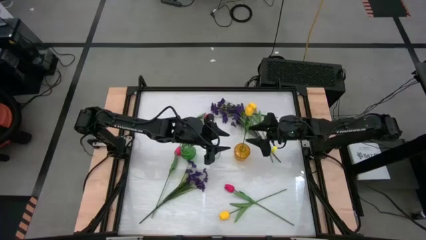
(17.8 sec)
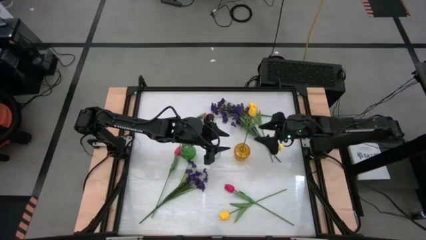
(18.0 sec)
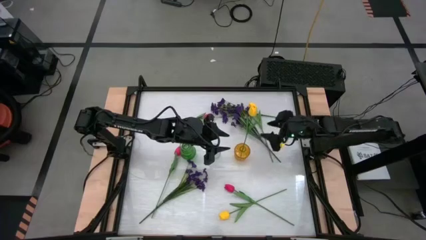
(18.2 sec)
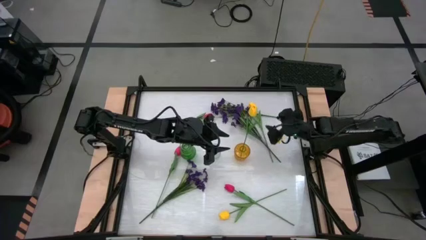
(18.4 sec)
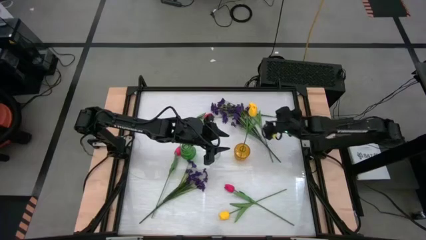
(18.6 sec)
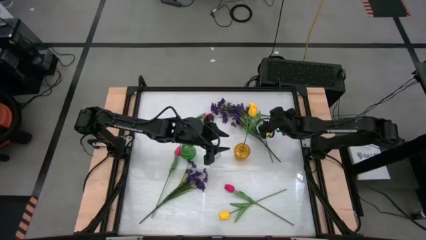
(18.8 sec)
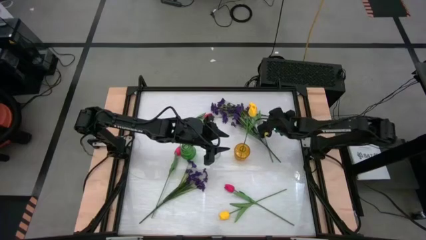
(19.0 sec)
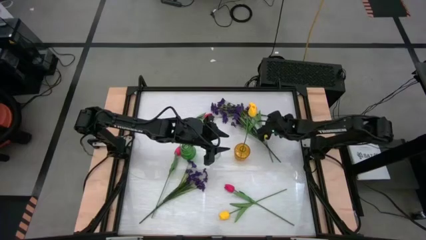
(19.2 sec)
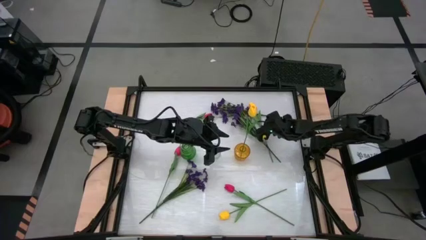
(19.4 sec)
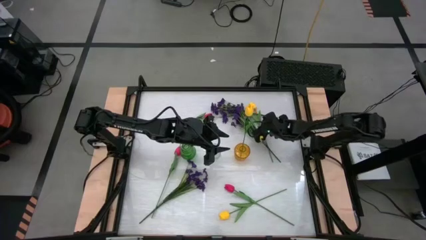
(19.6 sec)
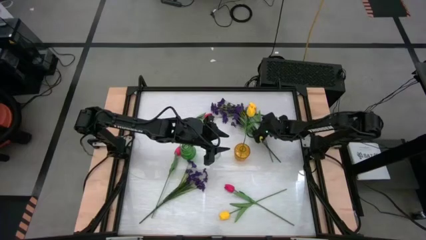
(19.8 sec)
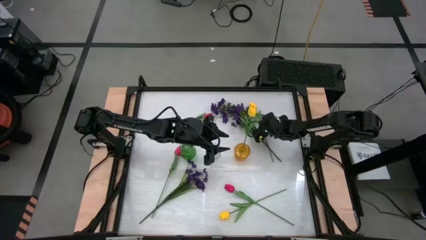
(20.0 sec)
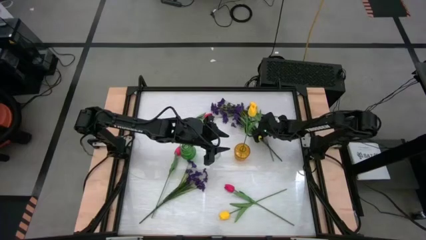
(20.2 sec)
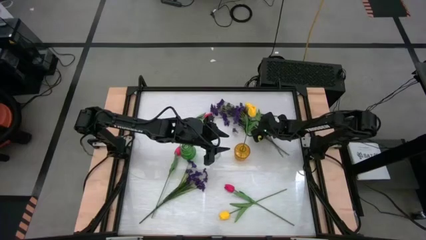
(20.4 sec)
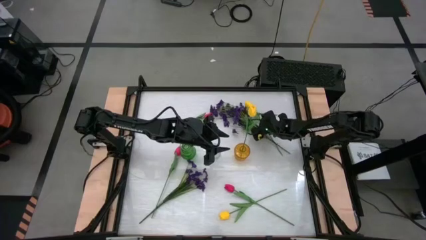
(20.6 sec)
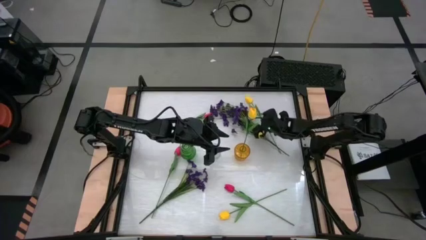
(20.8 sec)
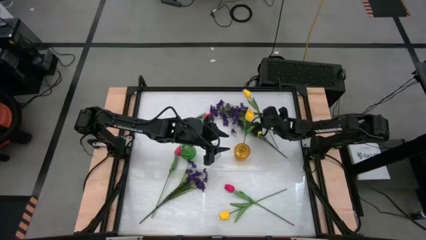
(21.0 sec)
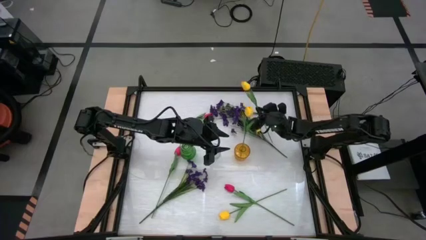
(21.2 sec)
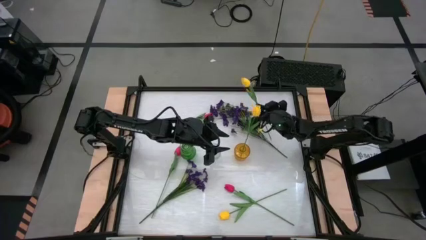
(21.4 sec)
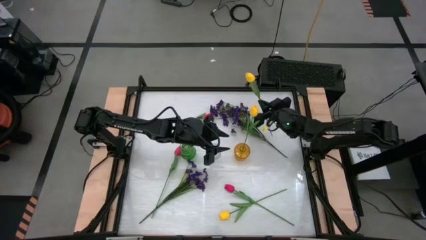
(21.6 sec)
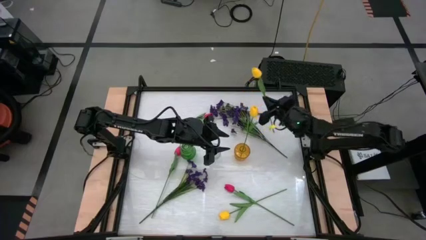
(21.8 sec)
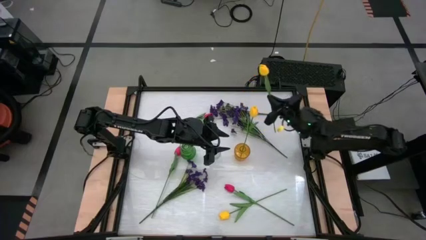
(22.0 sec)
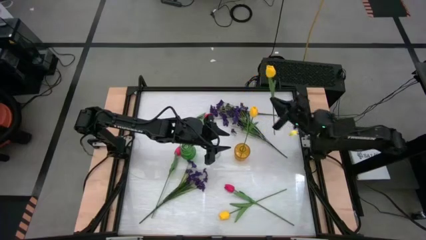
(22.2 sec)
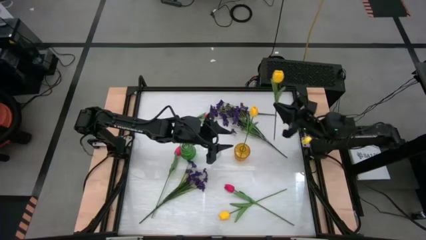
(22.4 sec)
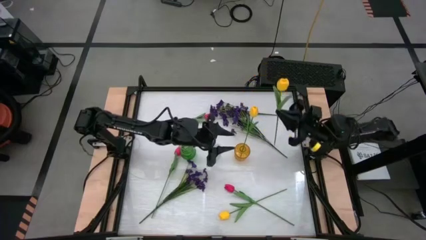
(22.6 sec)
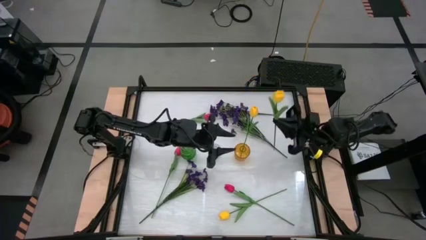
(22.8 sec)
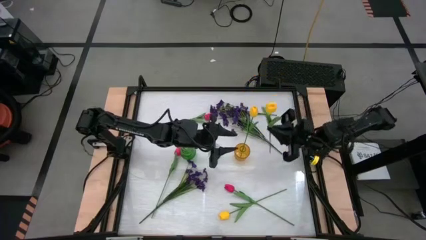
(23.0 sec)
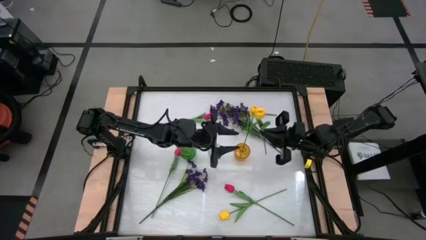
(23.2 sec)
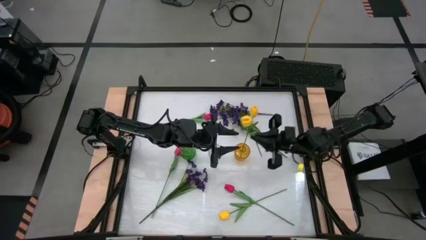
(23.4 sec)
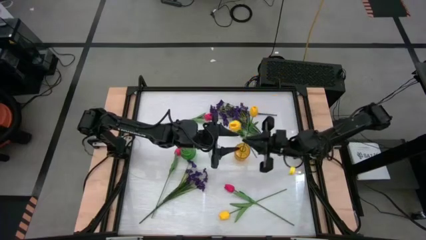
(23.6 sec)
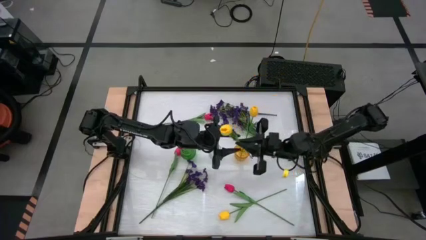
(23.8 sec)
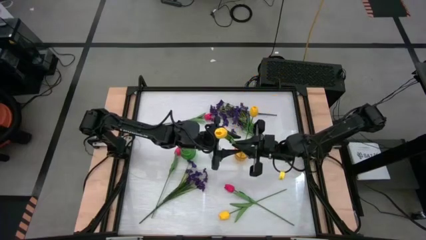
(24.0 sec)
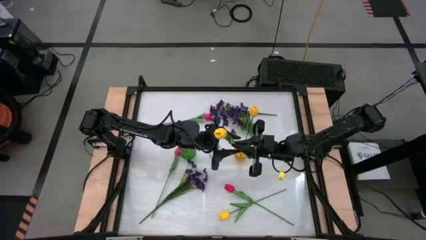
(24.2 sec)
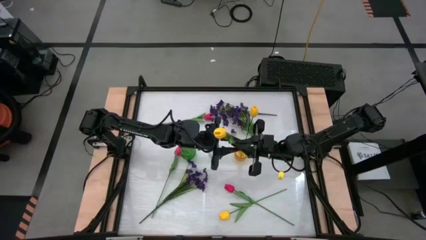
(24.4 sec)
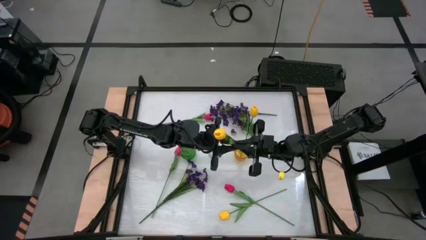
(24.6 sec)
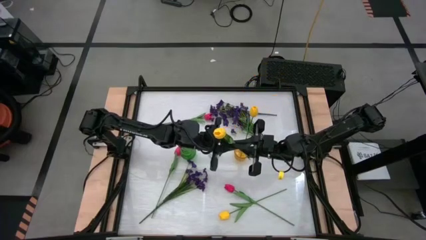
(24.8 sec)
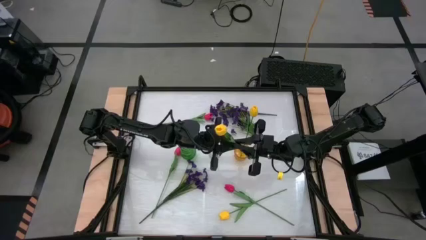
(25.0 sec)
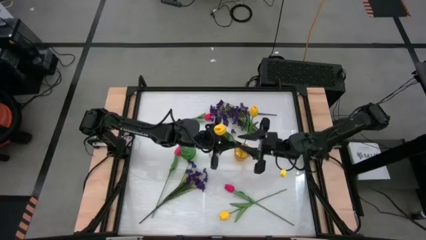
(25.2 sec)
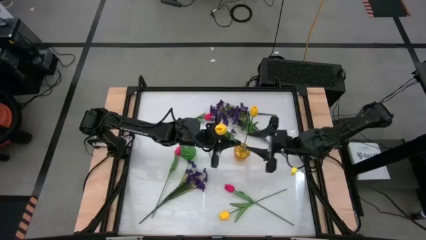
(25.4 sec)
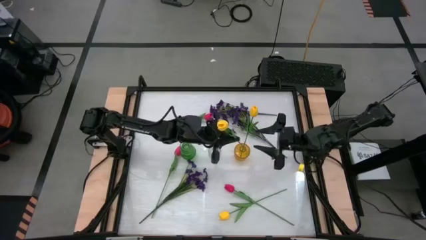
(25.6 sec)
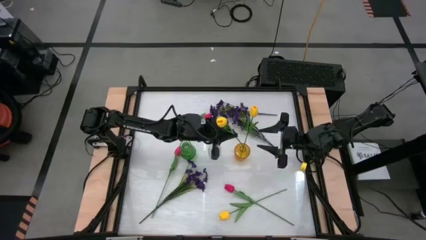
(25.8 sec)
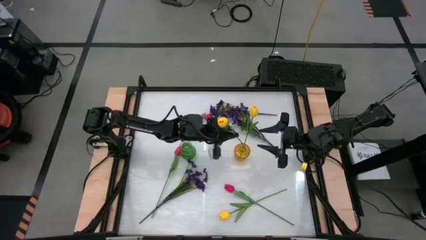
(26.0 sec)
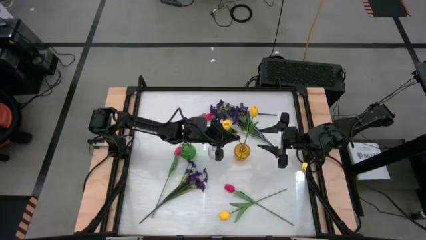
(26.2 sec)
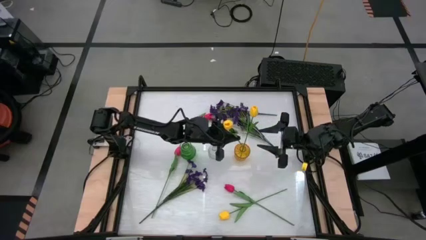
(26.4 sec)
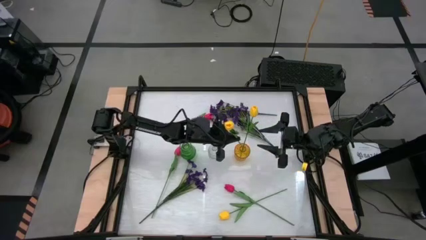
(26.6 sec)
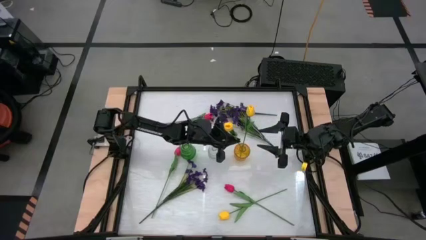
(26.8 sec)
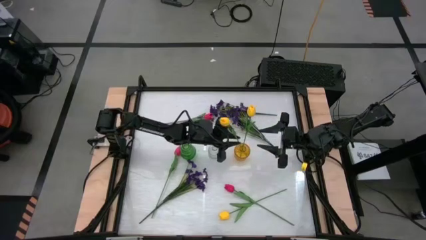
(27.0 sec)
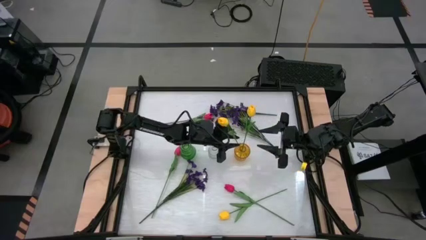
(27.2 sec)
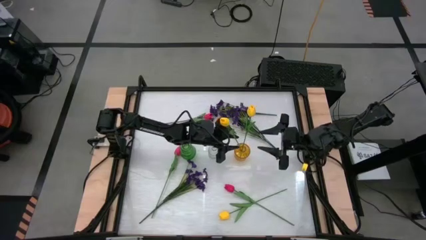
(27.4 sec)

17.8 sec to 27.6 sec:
Task: Sort flowers into vase by color
Put the top yellow tulip into the yellow vase

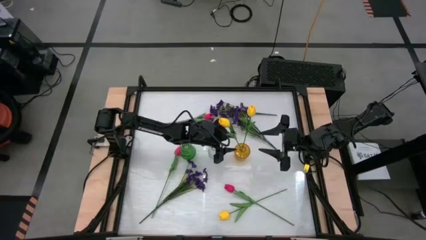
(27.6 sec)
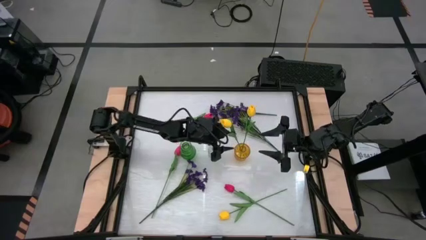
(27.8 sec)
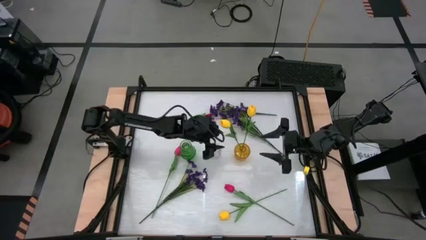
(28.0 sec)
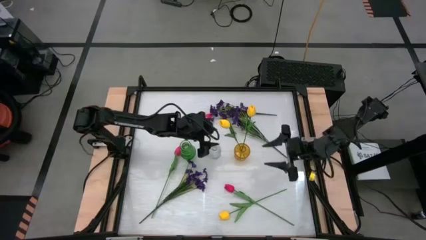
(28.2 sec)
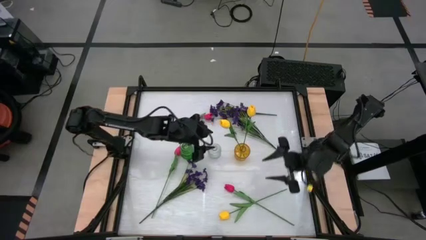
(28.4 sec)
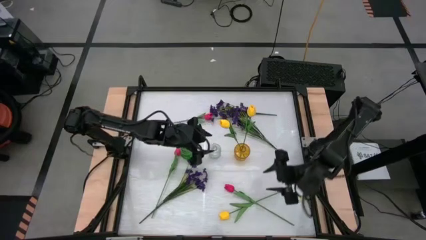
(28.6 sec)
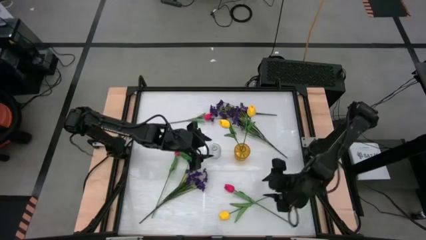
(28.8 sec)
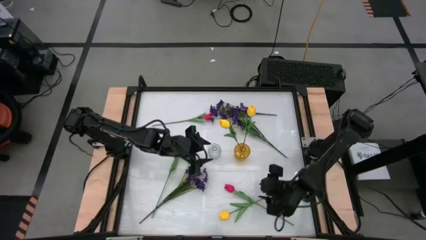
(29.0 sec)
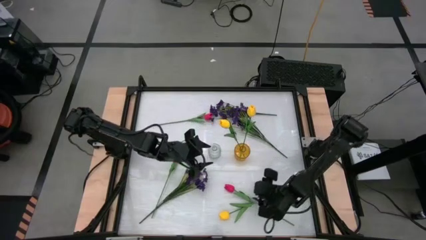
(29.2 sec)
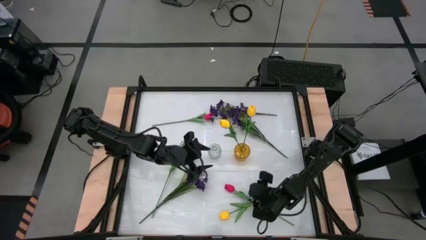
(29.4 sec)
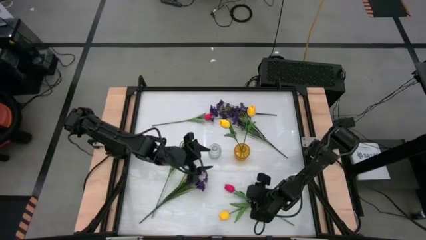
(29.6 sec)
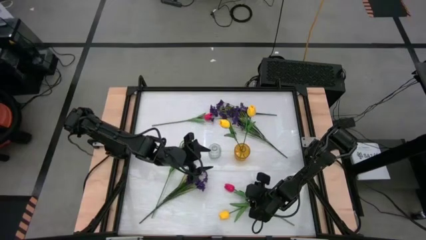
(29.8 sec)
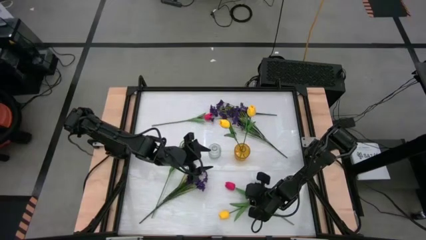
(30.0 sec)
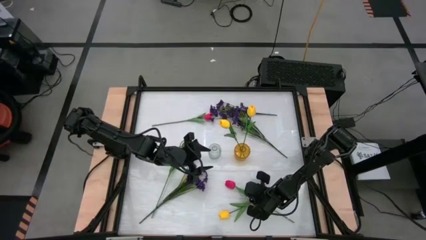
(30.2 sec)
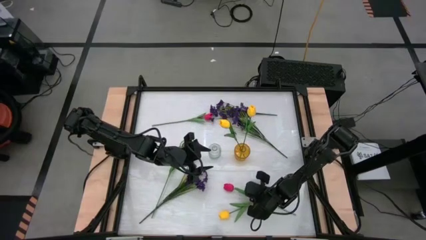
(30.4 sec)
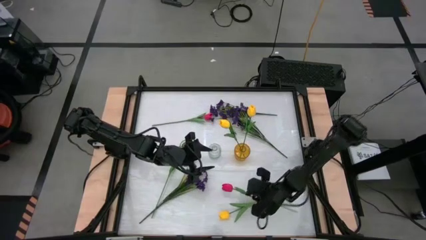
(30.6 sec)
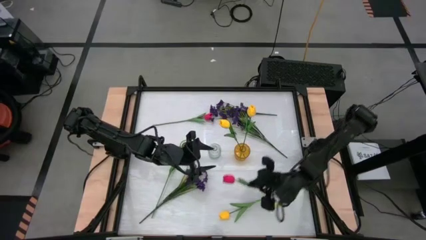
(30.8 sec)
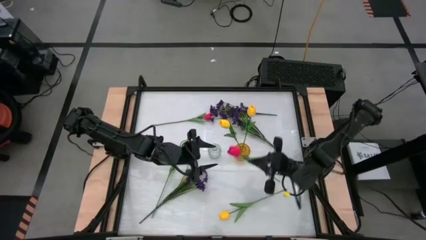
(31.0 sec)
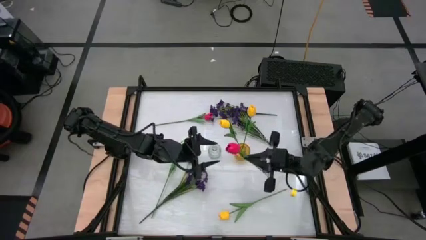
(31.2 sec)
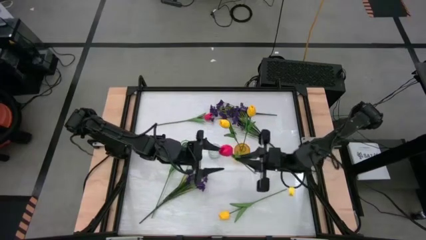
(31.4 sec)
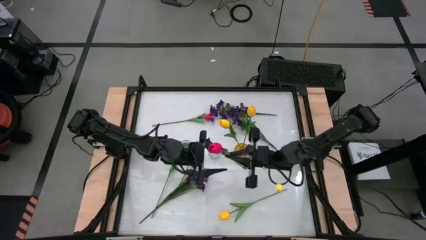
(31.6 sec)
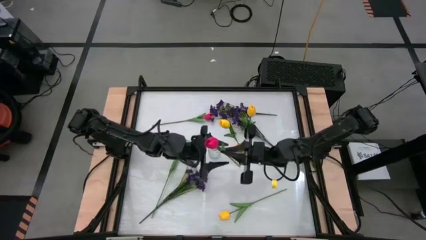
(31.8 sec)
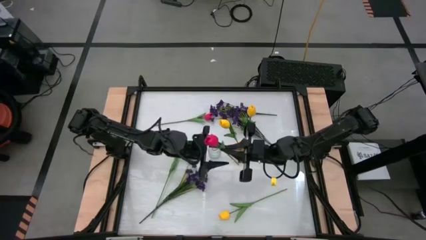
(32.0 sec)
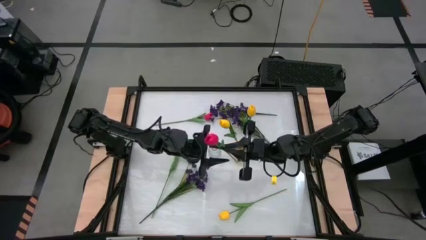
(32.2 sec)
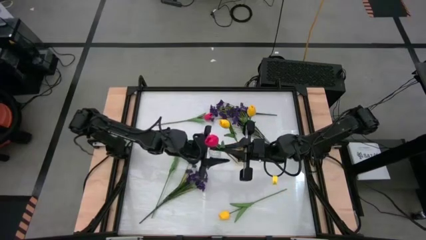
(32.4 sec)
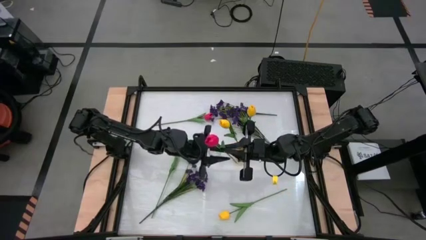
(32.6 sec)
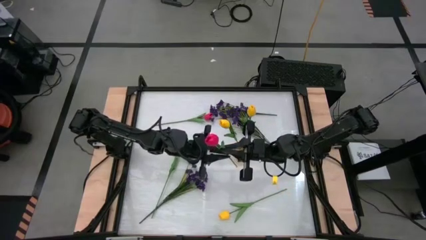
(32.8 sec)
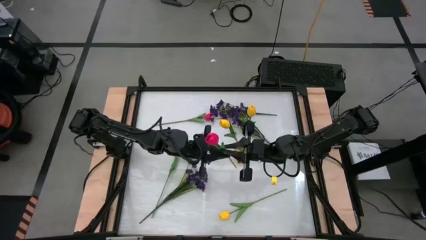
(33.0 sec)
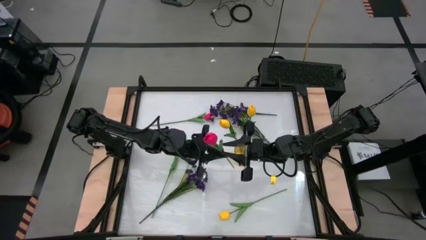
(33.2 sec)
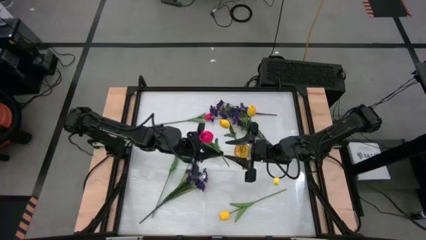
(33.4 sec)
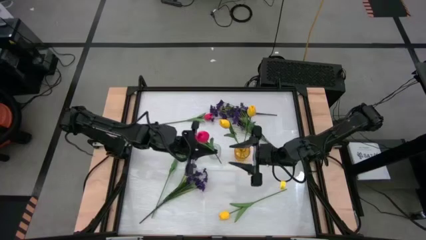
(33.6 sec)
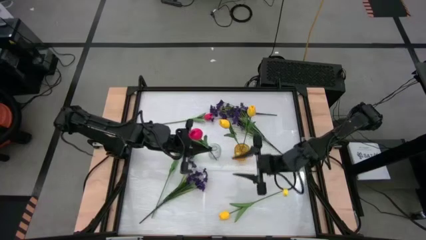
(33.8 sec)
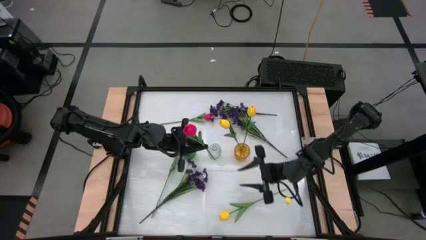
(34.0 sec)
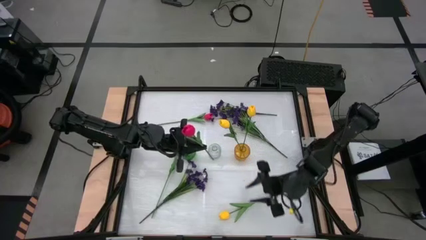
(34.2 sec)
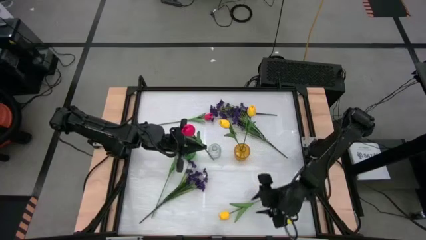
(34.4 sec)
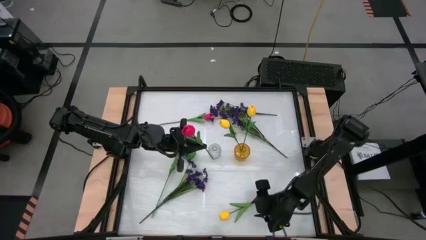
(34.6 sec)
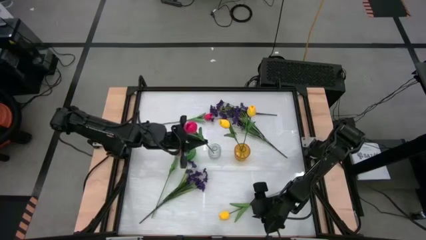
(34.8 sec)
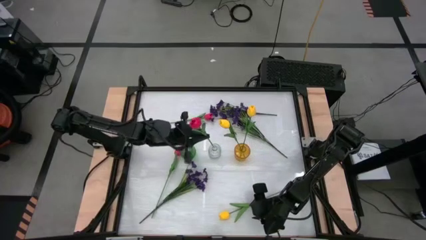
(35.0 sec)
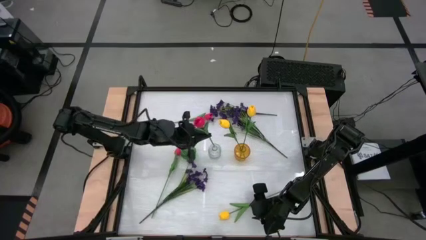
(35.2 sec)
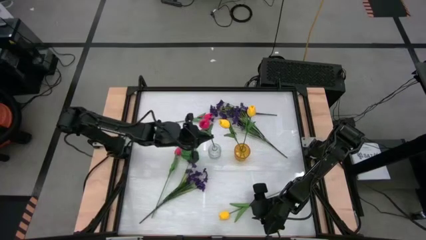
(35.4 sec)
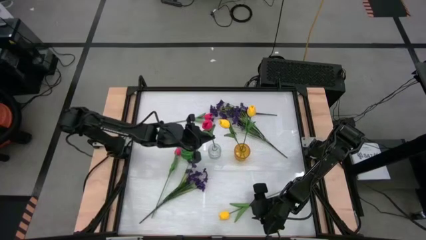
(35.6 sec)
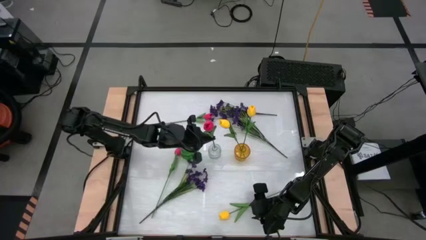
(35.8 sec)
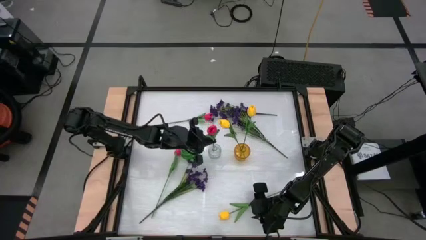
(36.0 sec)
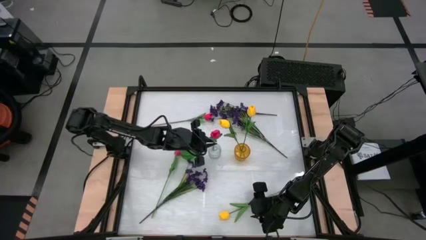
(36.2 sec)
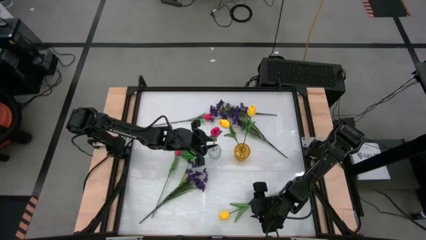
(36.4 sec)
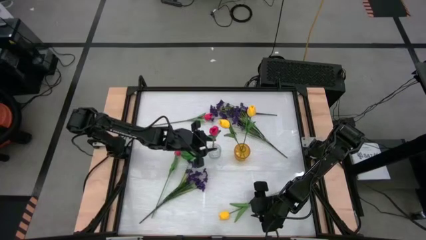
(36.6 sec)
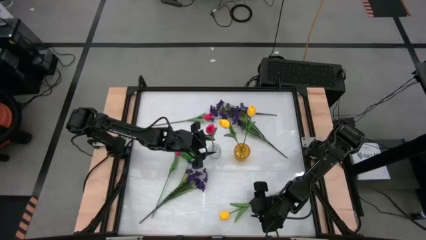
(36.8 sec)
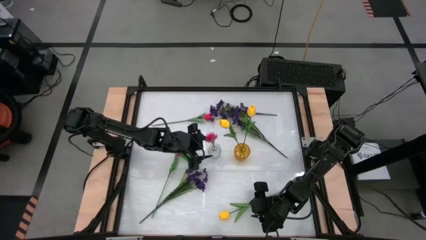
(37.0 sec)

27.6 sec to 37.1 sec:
Put the bottom red tulip into the transparent vase
